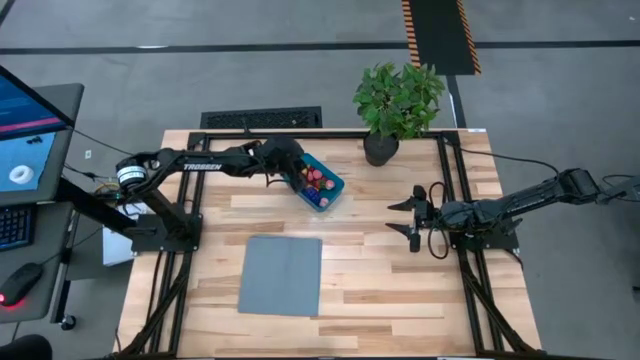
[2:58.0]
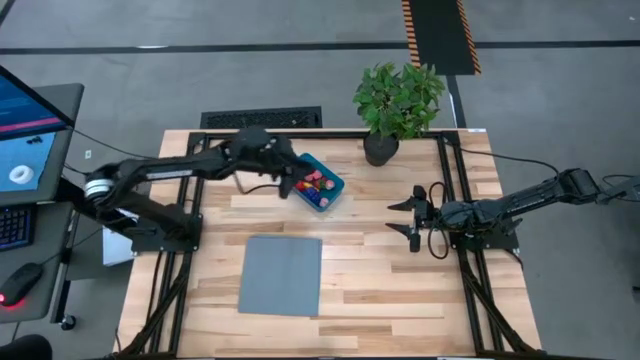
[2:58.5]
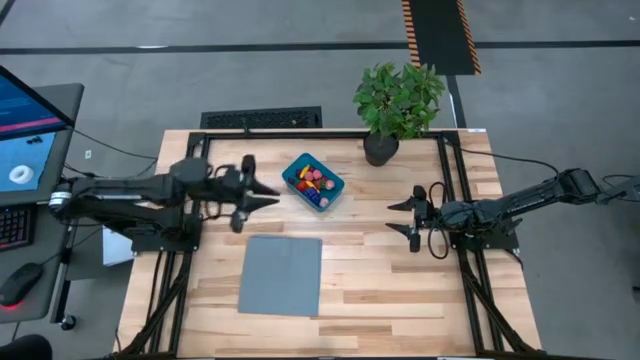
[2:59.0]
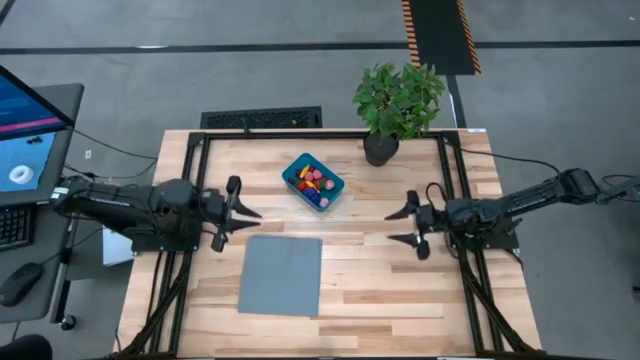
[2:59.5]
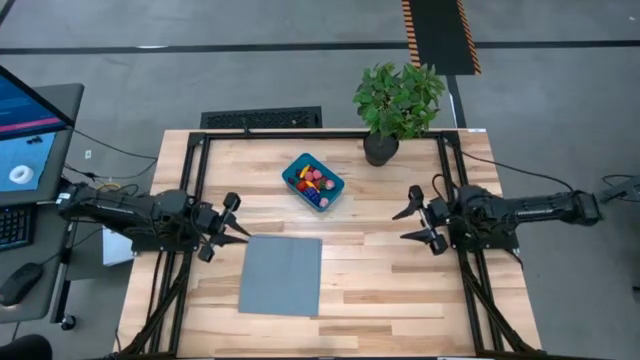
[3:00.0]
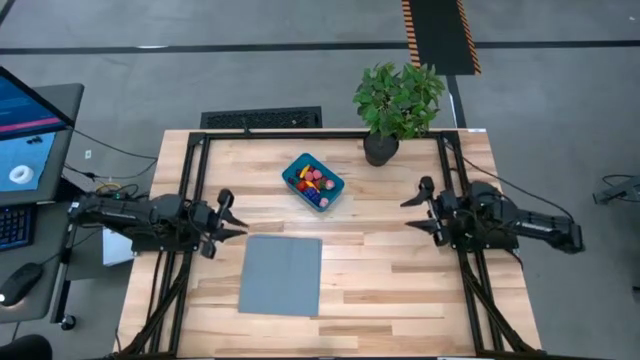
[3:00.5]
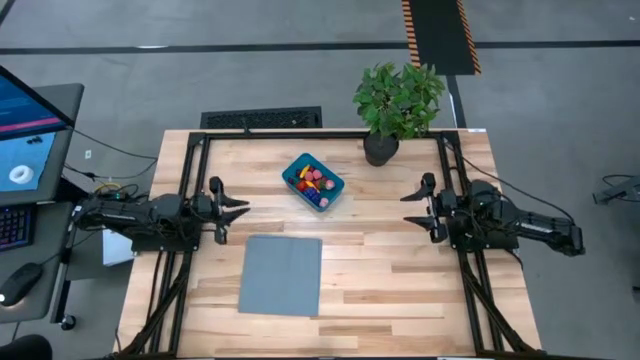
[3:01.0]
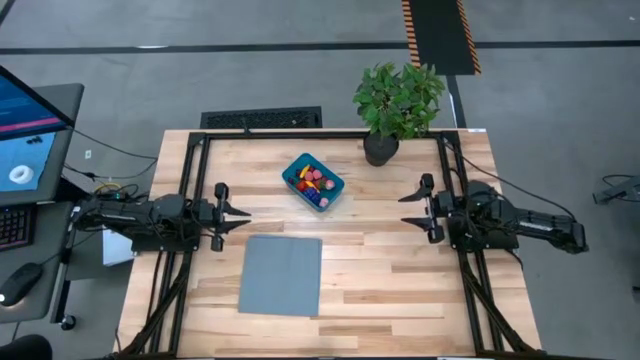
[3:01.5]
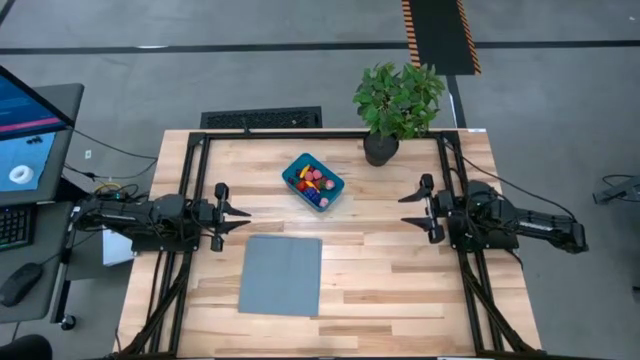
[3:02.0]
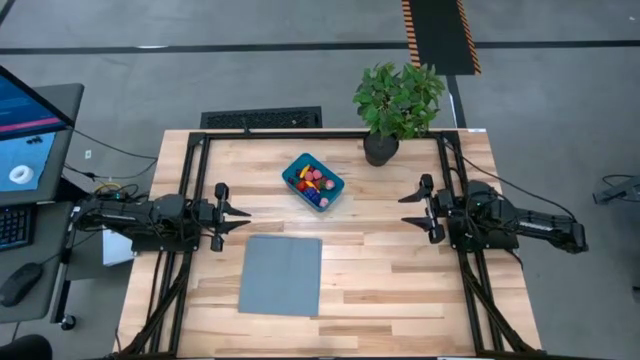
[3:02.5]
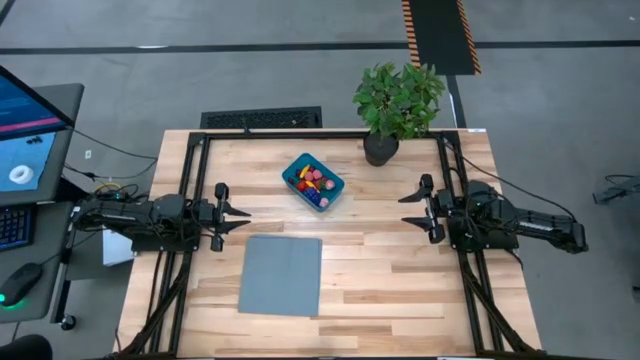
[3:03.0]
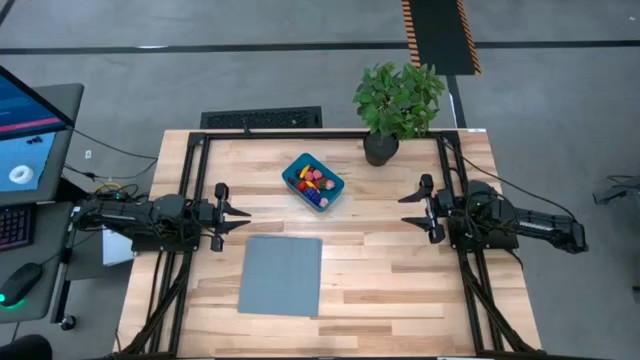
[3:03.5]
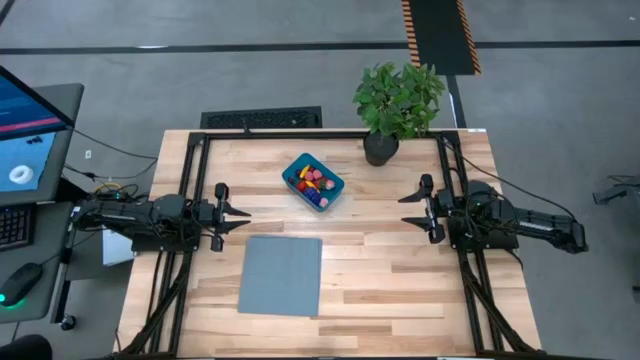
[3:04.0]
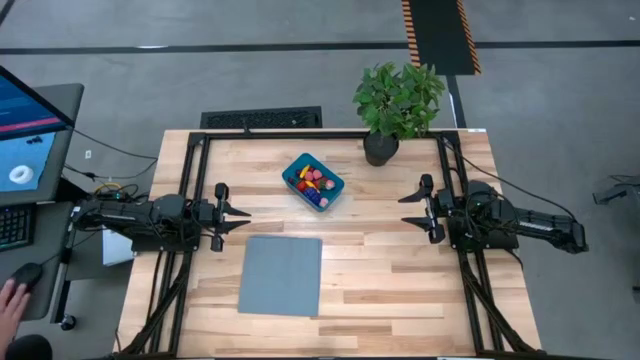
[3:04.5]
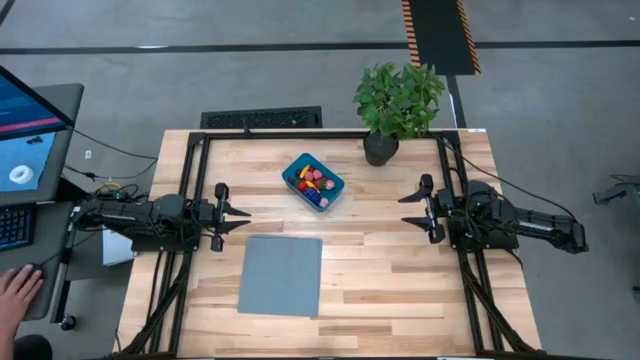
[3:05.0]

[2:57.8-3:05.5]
Task: Pick and placing Produce into tupperware
Return to Home Position

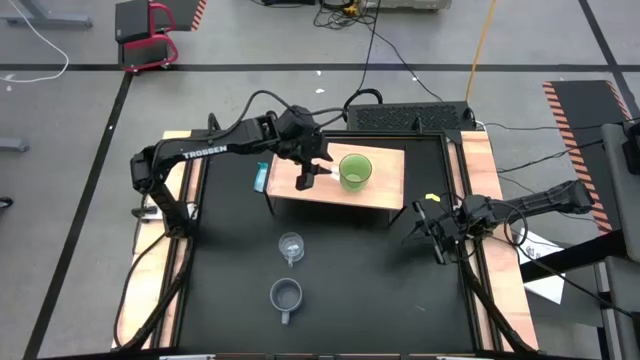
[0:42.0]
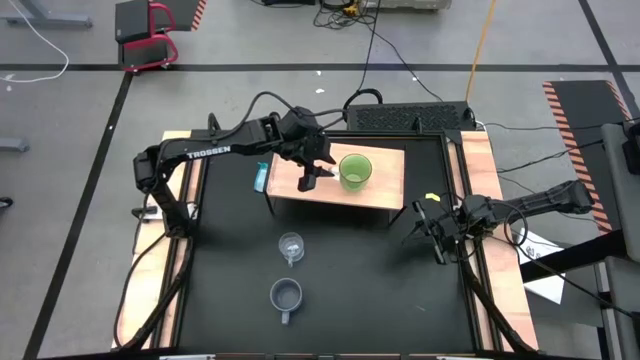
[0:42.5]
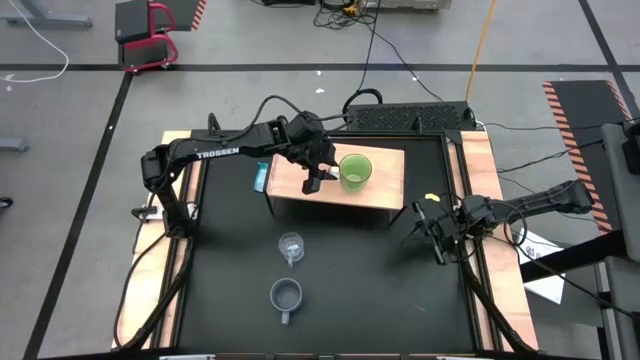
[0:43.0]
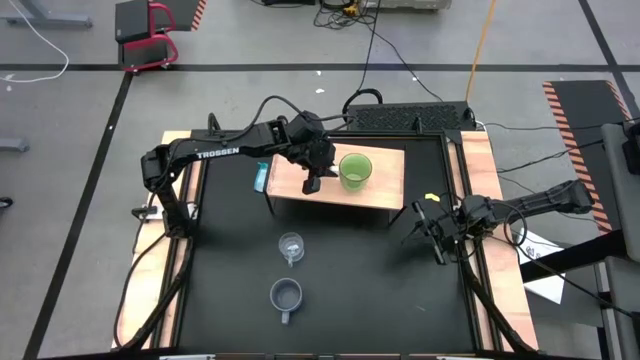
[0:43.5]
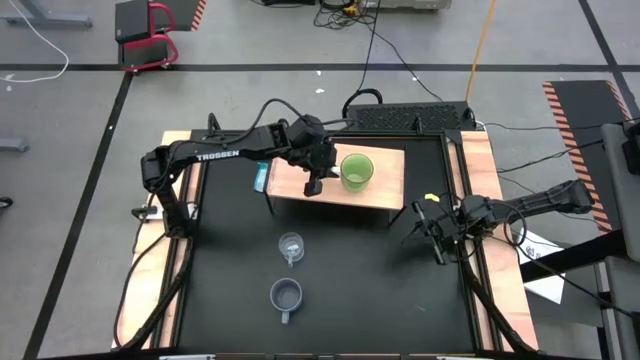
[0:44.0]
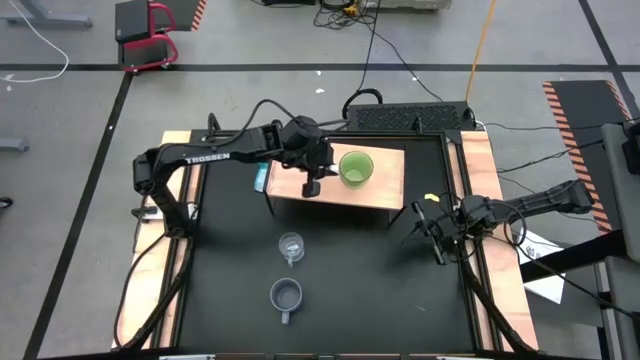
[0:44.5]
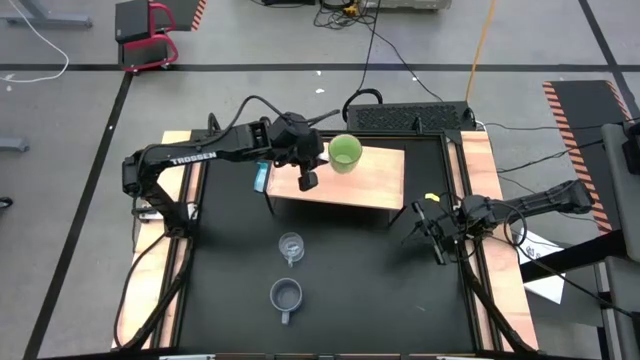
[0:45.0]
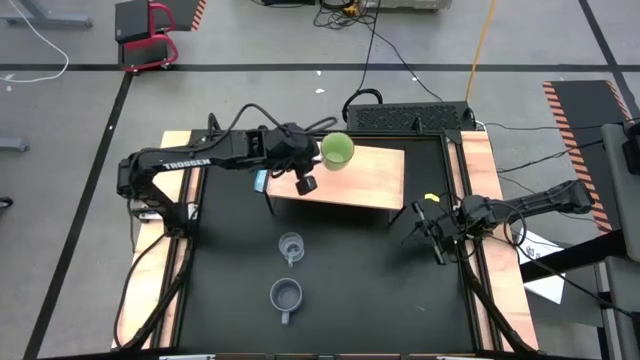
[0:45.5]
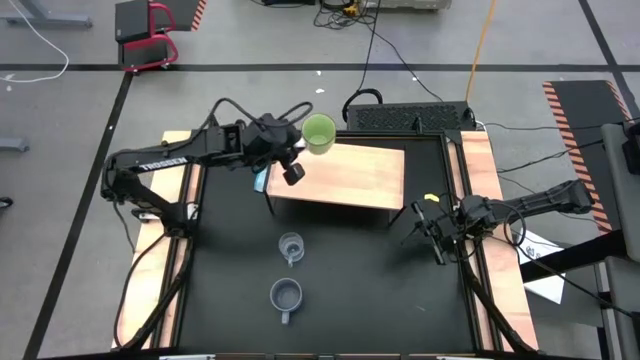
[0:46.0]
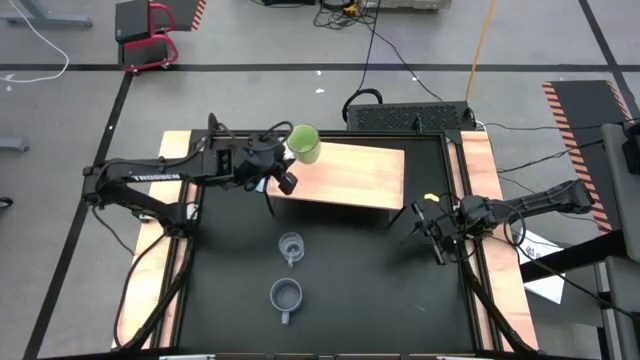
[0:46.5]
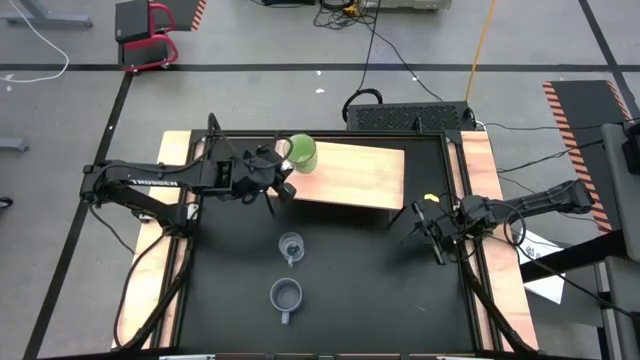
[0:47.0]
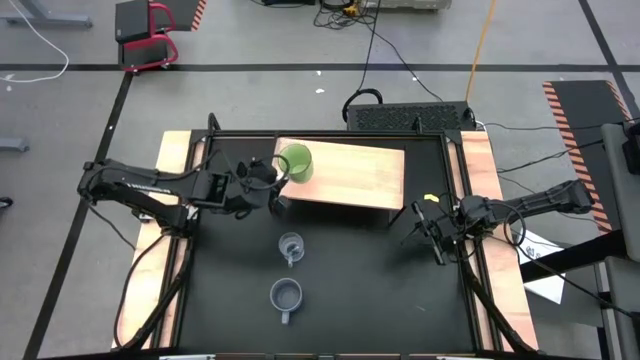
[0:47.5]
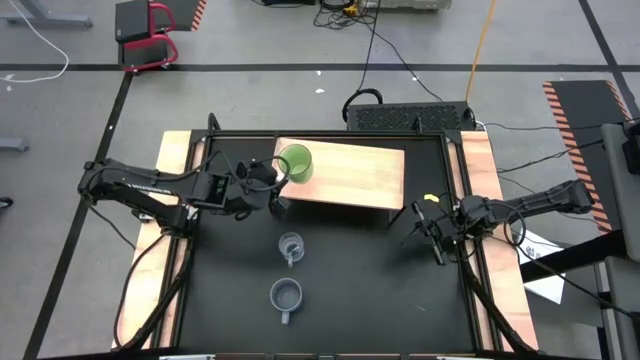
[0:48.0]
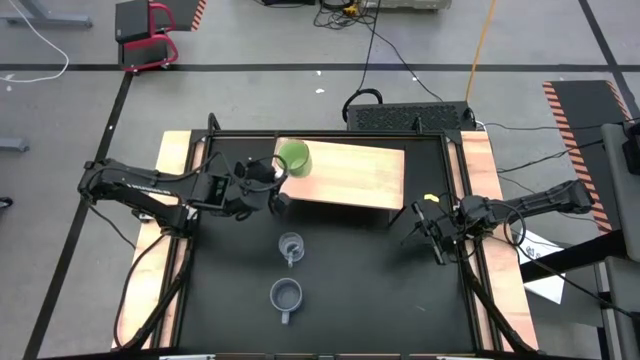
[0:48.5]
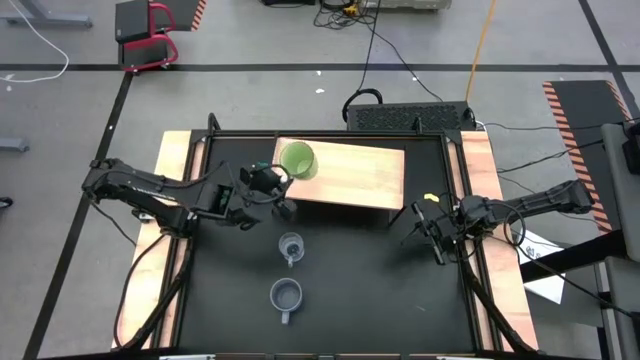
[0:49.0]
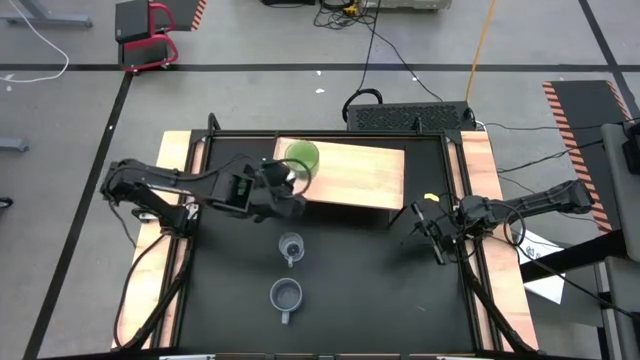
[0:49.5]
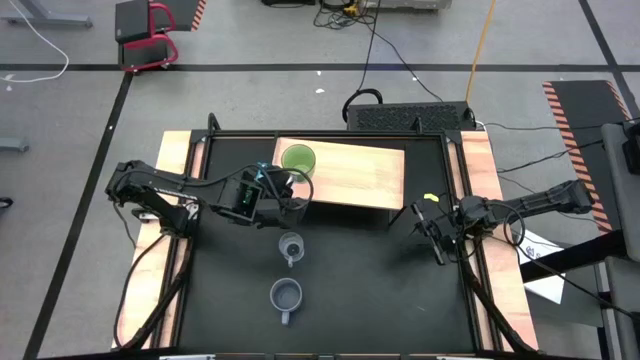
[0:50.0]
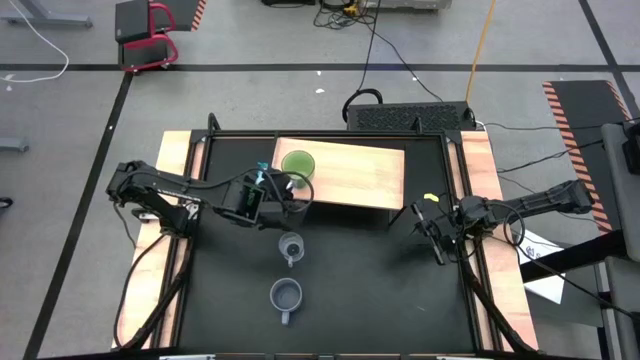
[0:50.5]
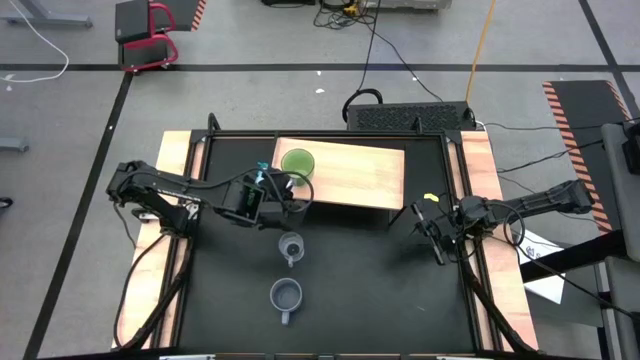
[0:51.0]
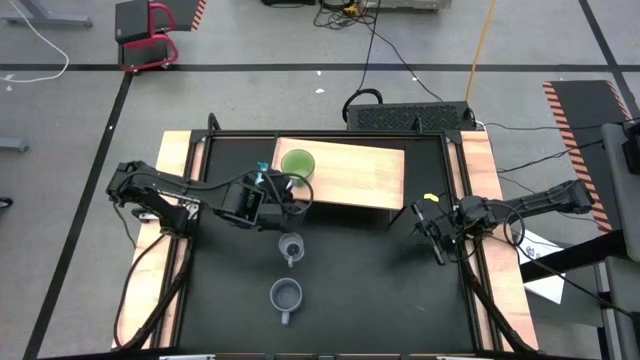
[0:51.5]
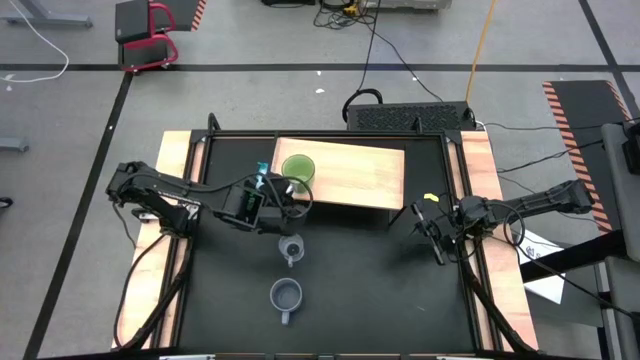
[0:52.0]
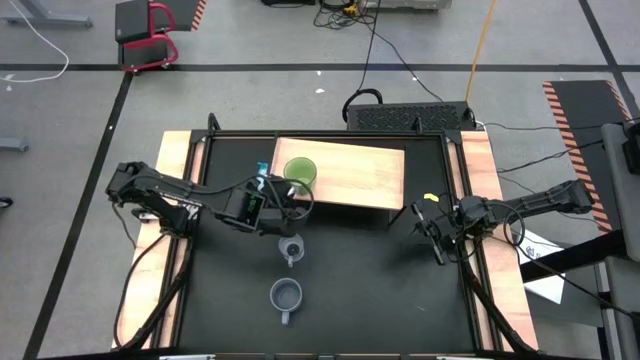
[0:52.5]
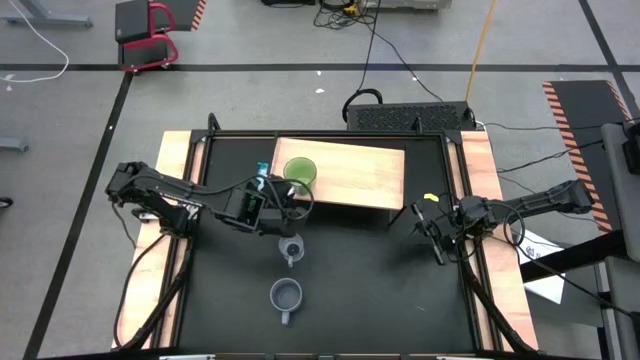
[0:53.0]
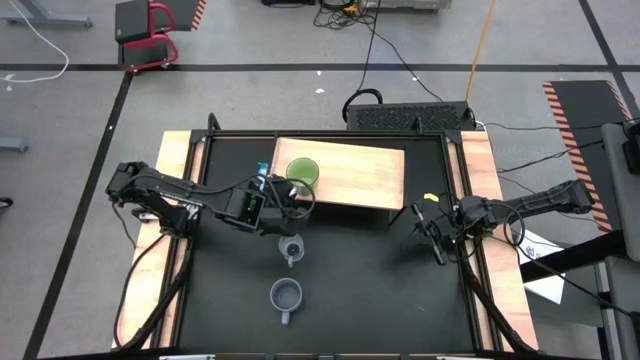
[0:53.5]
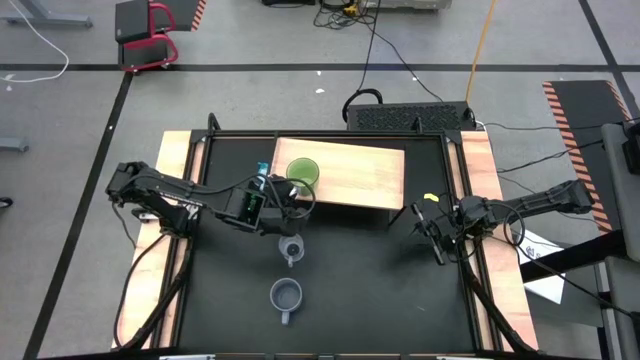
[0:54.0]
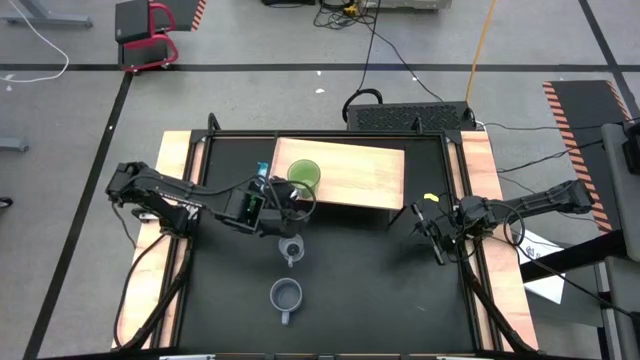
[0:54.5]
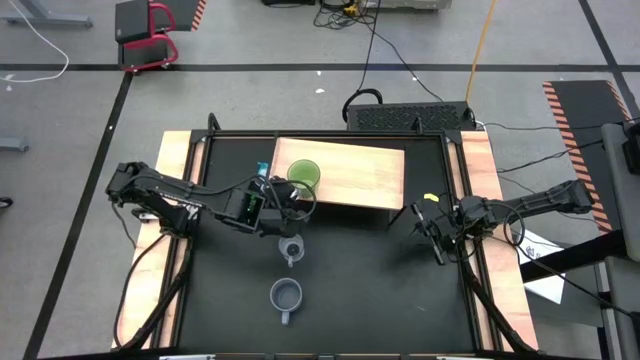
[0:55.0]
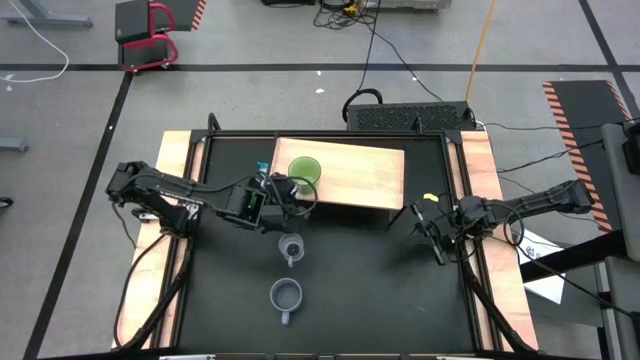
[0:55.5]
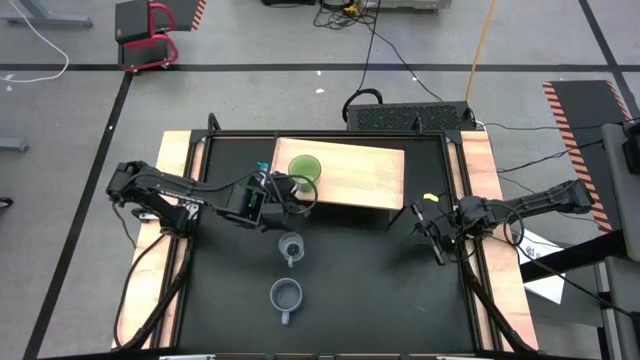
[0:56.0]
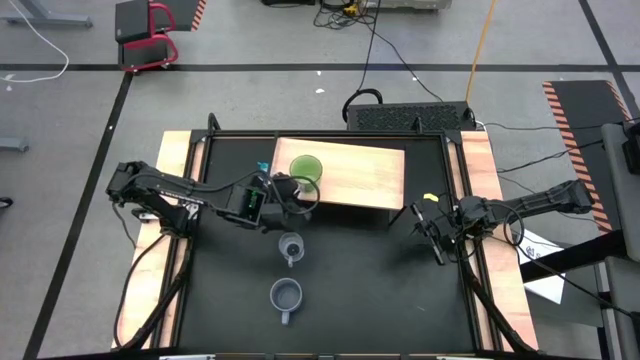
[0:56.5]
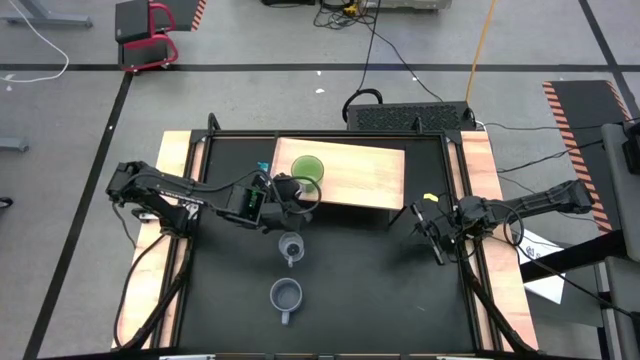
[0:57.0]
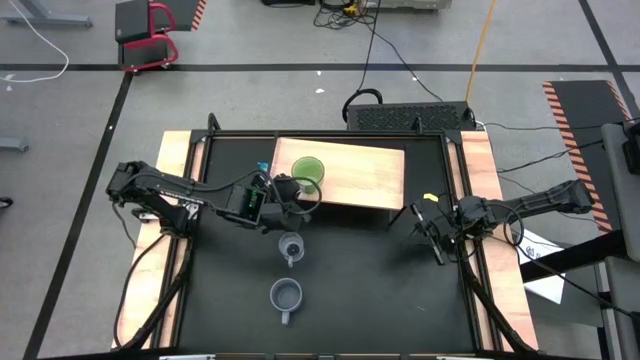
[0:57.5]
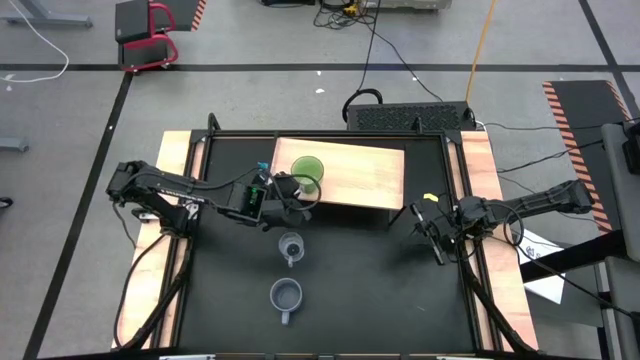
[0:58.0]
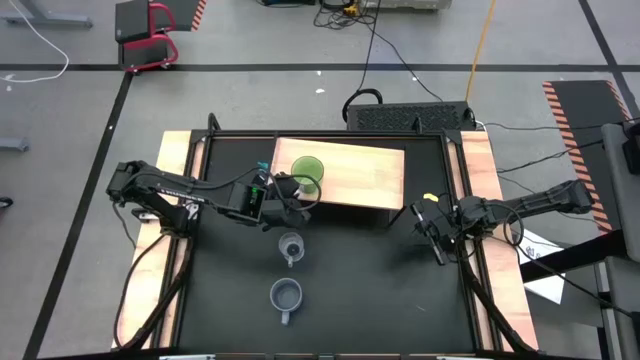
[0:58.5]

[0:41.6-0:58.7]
Task: Stack small to large cups/mugs on shelf
Put the green cup on the shelf
